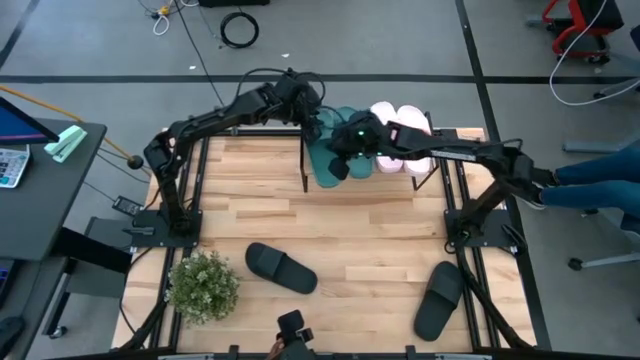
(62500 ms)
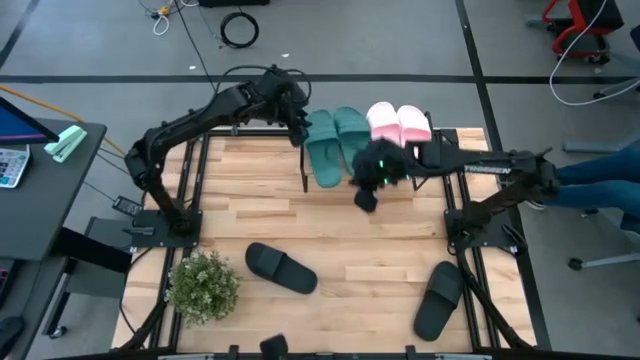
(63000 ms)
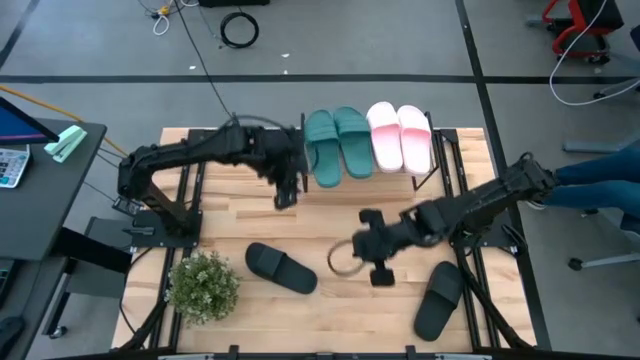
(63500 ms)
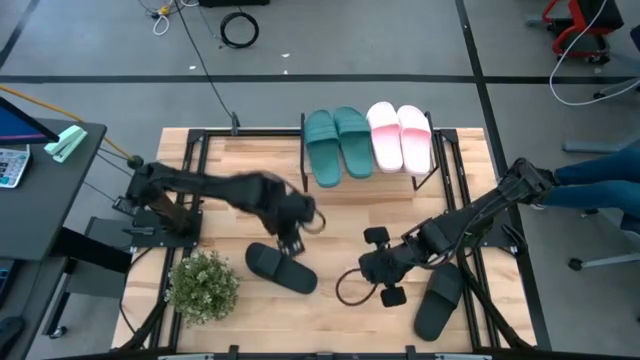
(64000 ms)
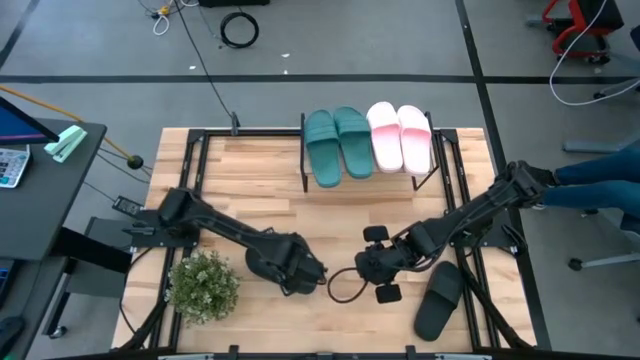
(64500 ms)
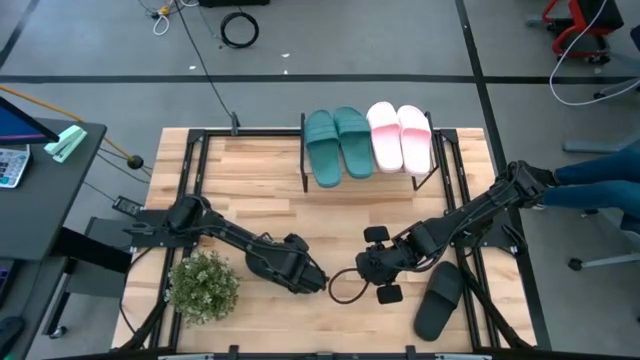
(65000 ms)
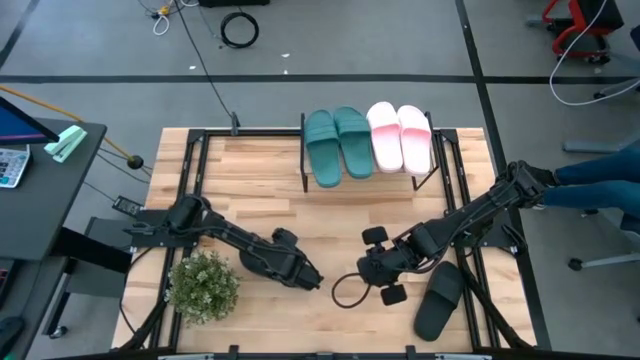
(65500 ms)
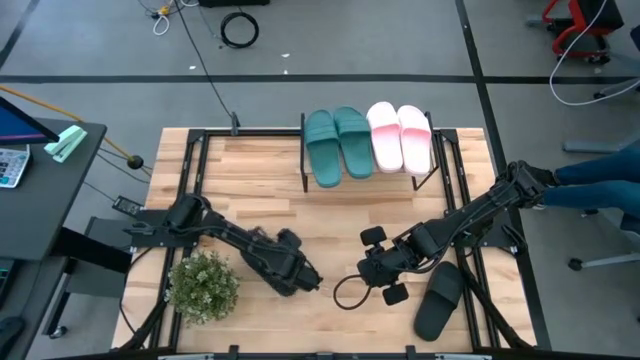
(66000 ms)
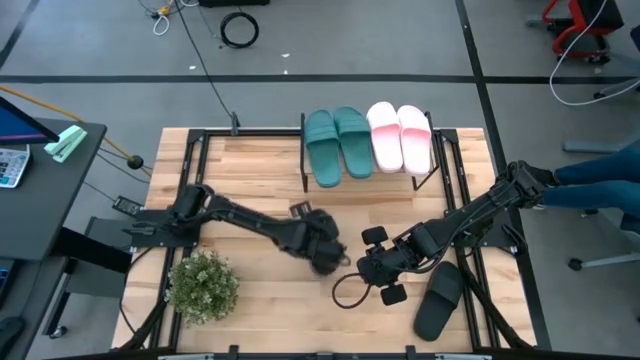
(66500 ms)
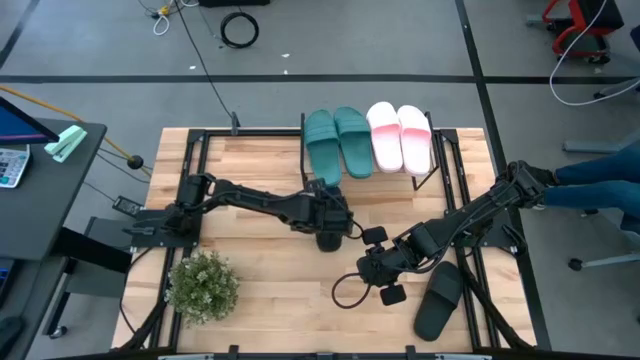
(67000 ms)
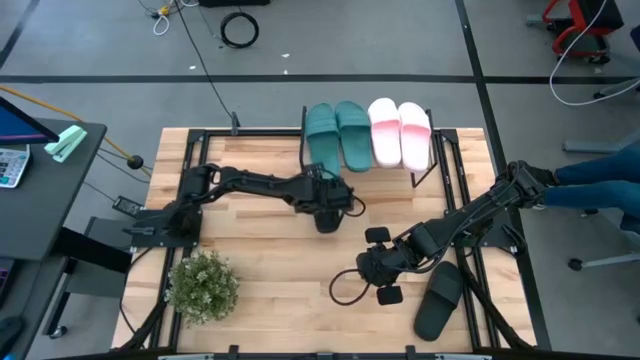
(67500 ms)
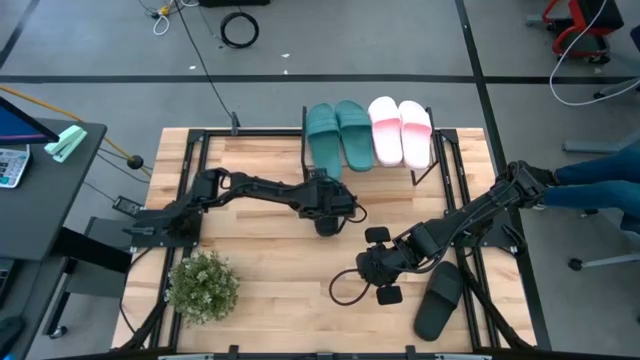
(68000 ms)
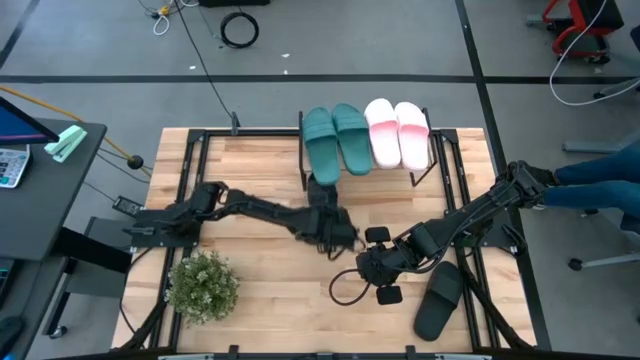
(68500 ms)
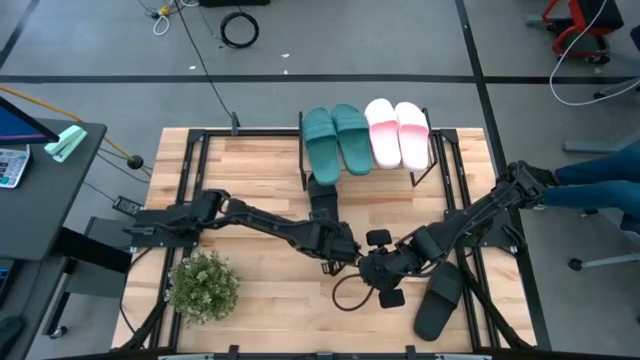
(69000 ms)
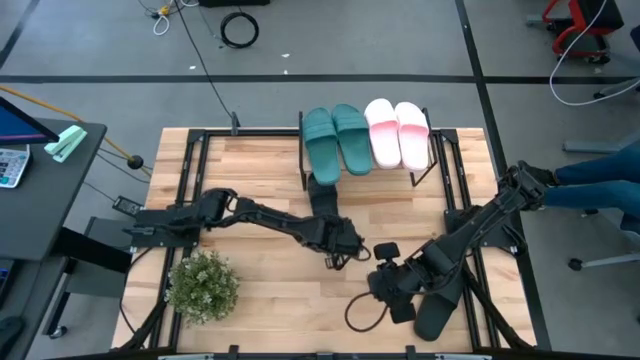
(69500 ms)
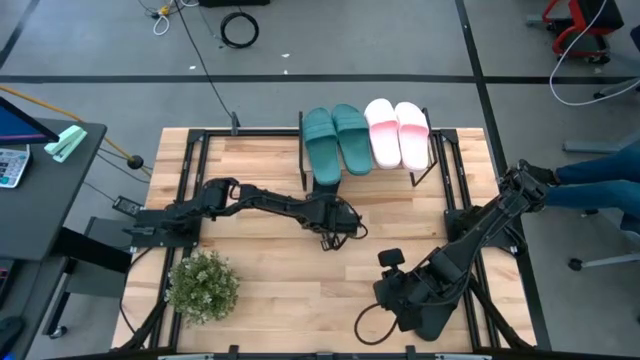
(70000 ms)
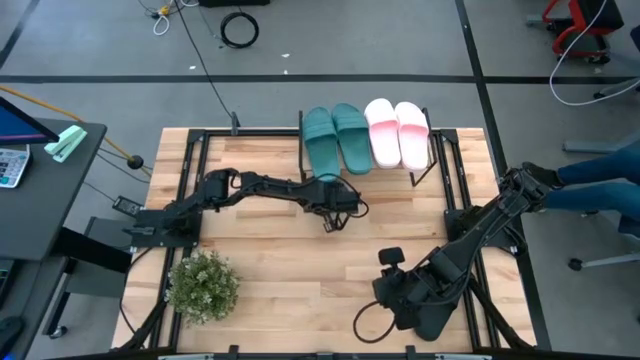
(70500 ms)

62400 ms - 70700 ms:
Task: Pick and place slides into the shelf
Put the left black slipper under the shelf

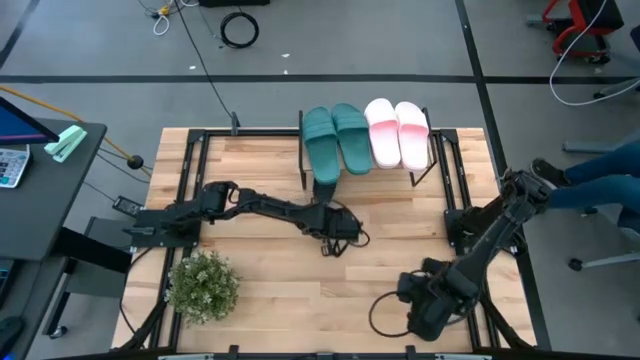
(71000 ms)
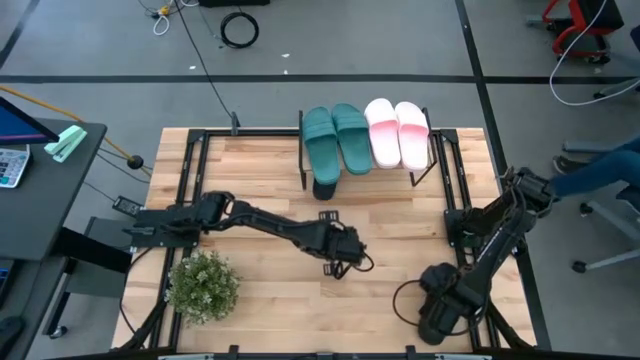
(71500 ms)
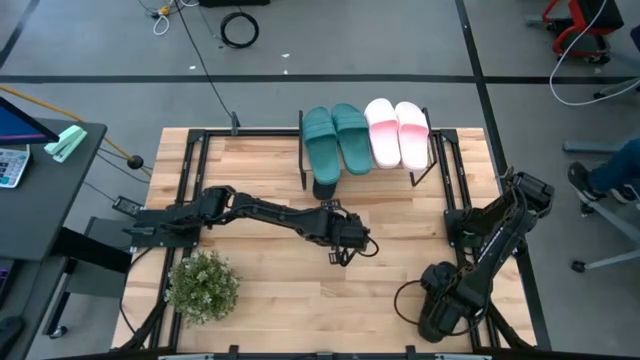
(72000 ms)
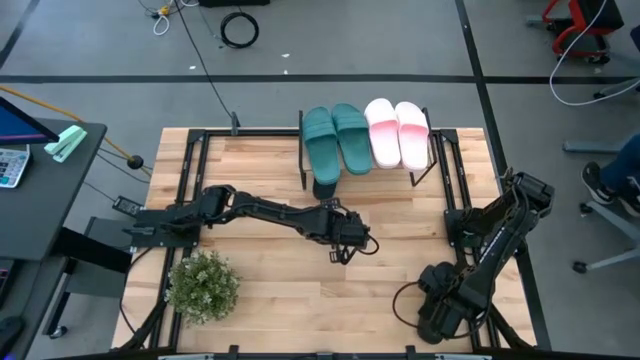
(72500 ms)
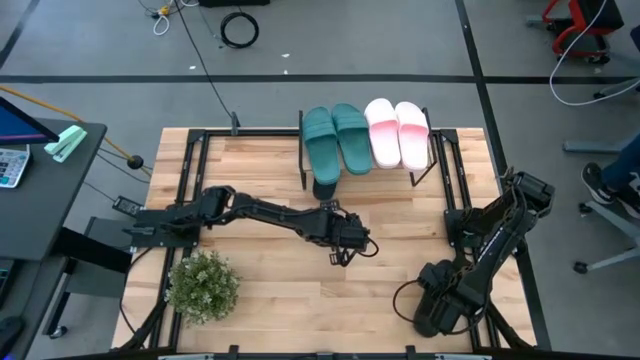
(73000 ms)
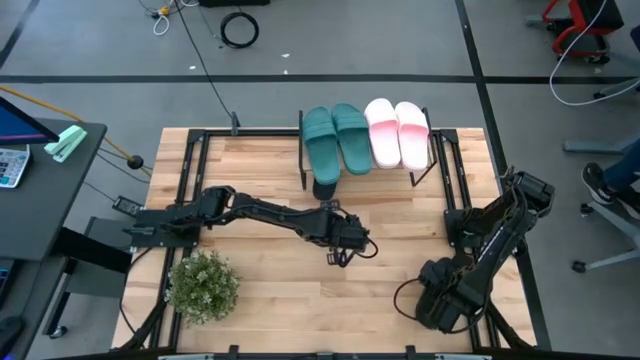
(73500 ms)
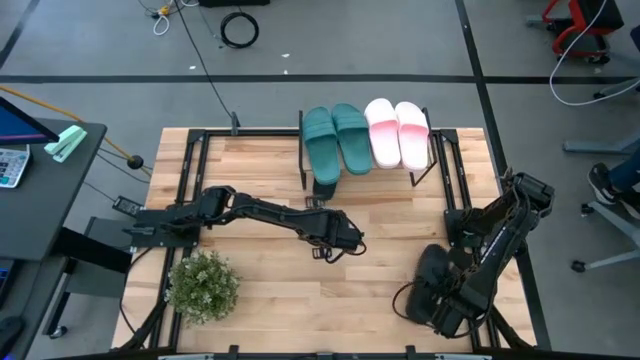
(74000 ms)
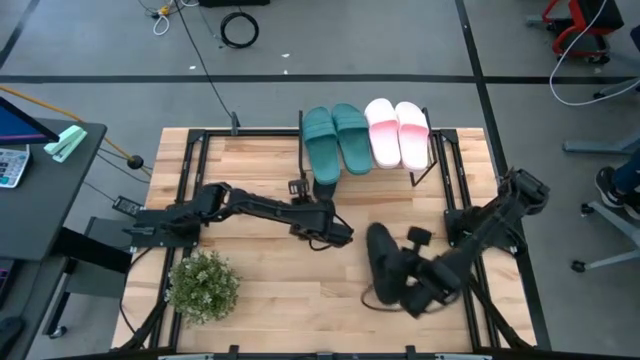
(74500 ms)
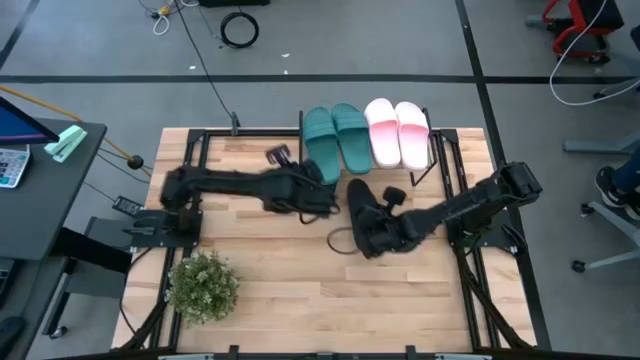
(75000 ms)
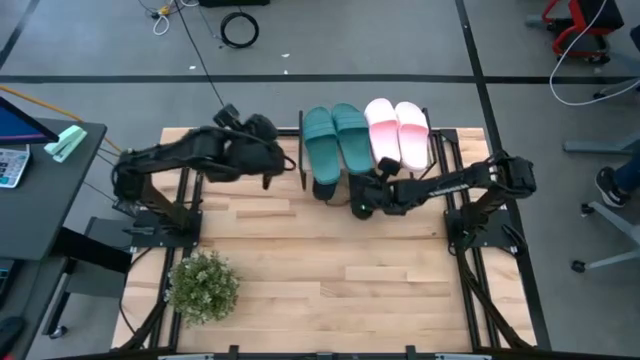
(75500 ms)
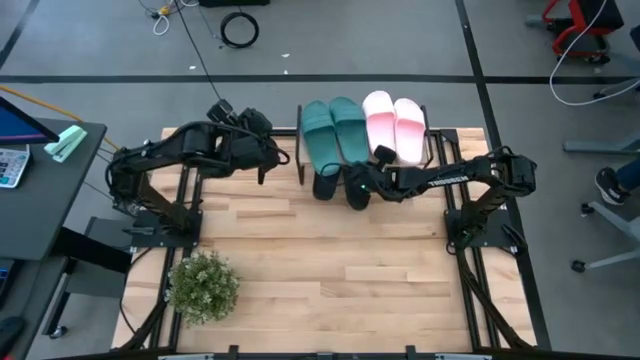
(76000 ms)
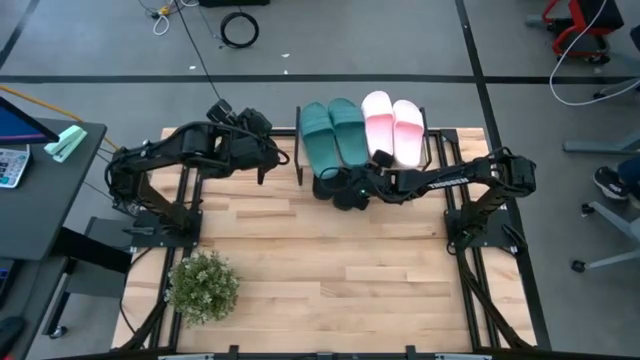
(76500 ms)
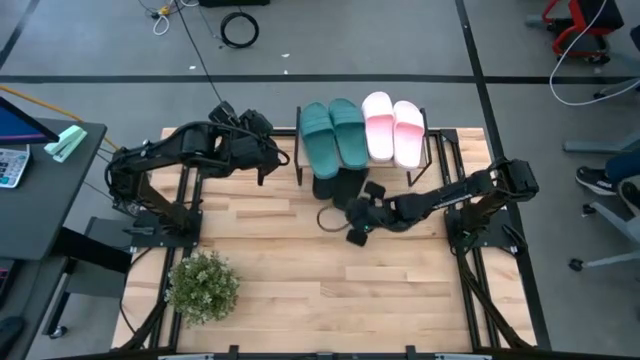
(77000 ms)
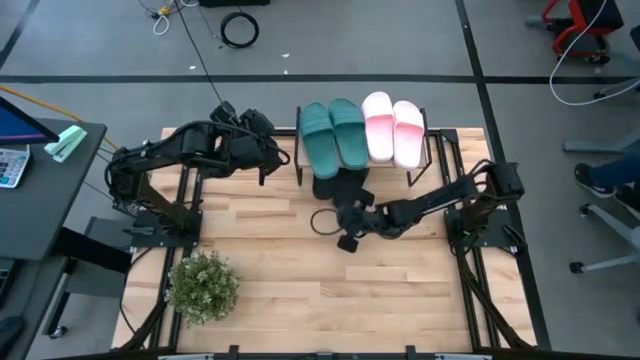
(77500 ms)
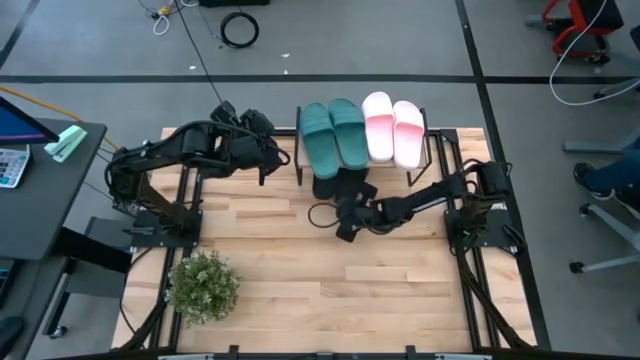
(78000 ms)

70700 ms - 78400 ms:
Put the black slipper under the shelf

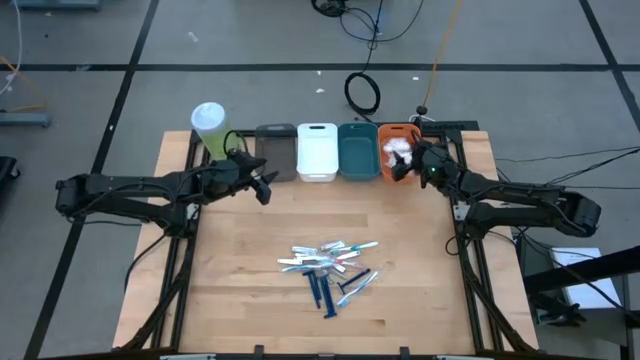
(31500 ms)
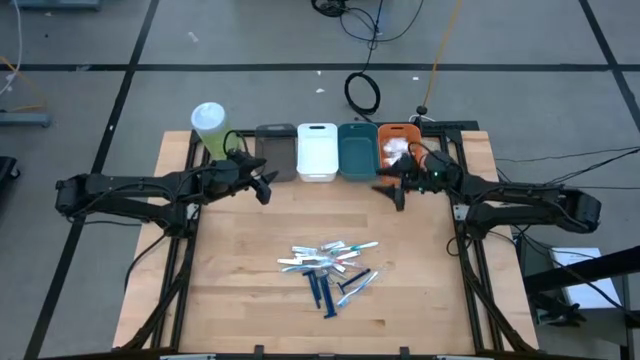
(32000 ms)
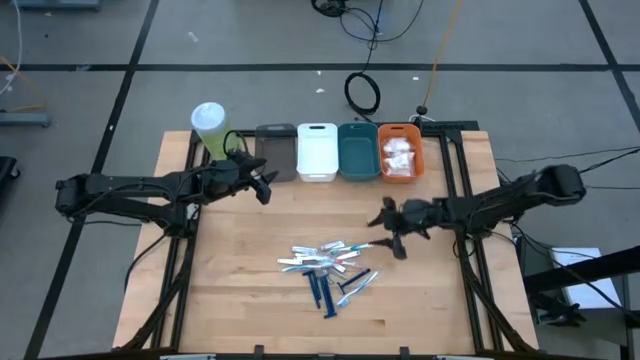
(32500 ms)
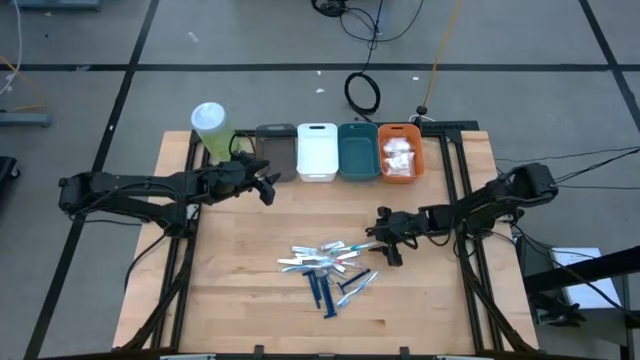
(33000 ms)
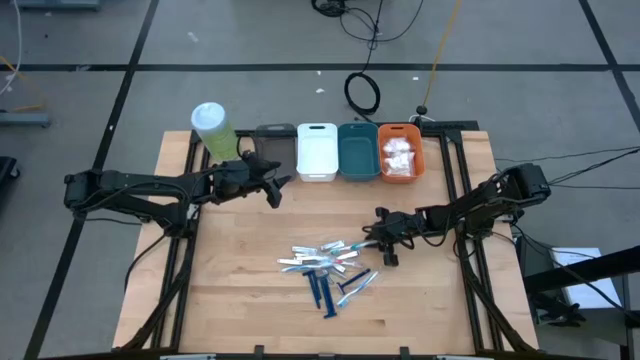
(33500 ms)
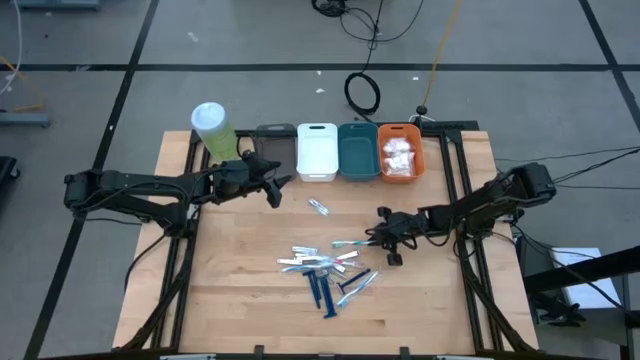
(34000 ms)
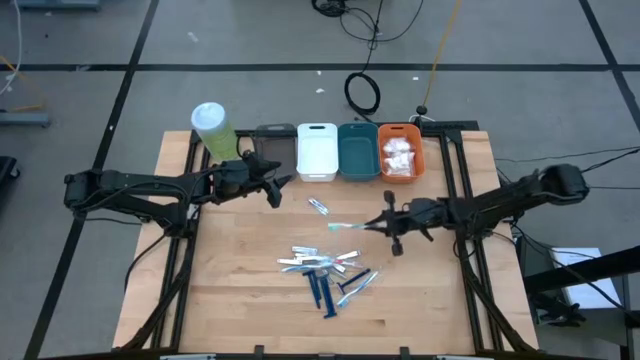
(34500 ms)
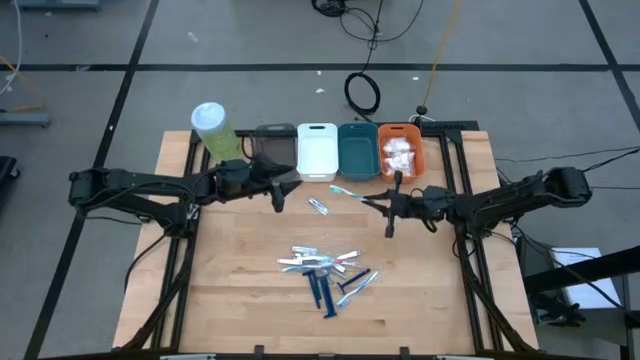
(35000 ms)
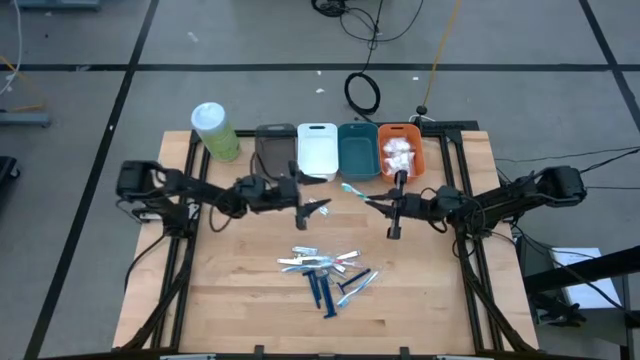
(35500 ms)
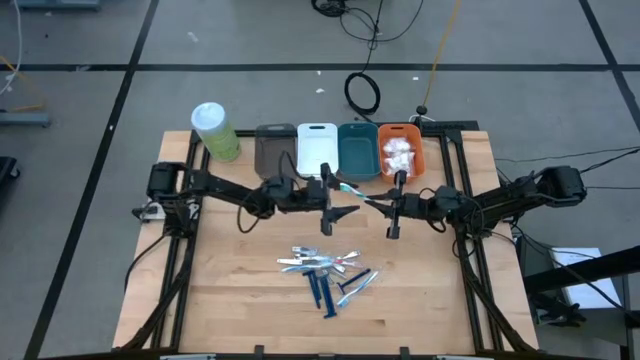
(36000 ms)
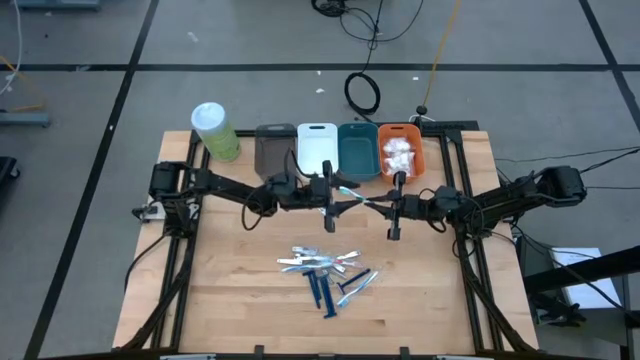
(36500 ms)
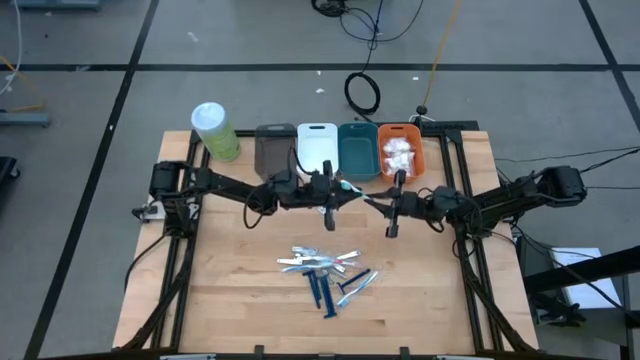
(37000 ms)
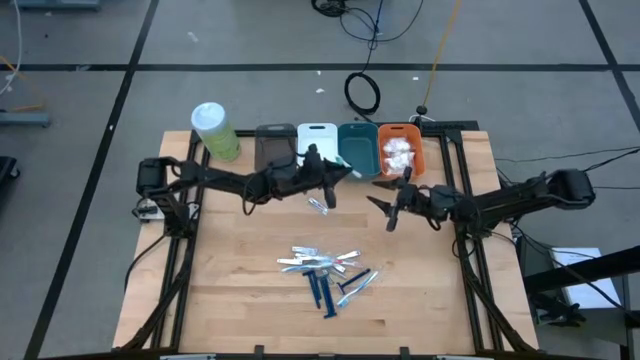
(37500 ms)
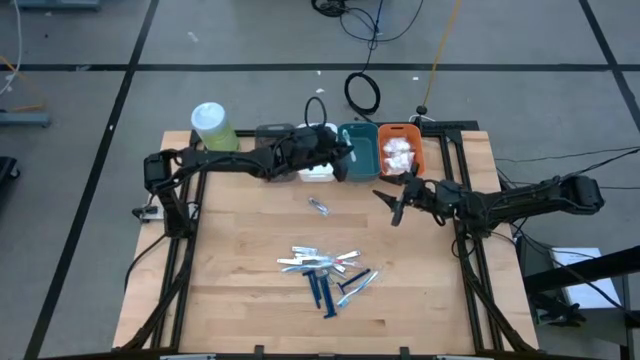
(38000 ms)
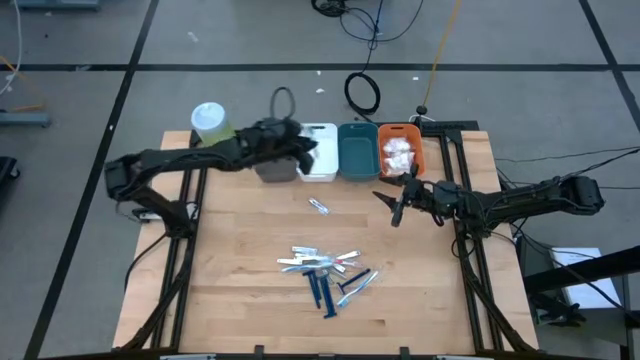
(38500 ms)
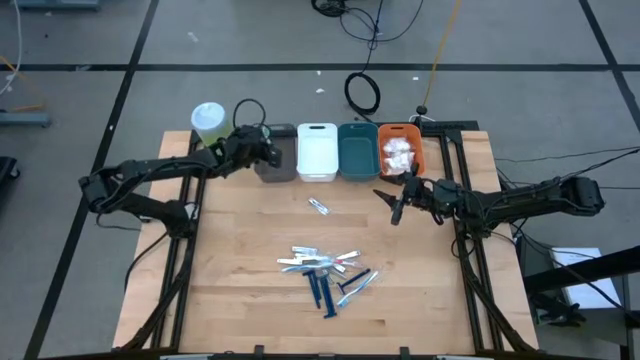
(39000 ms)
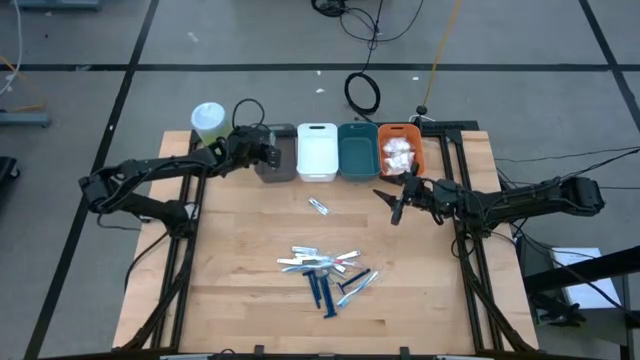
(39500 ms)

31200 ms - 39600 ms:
Task: Pick & Place Travel size toiletries
Put the green toothbrush into the black bin
